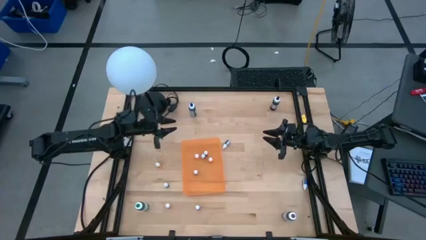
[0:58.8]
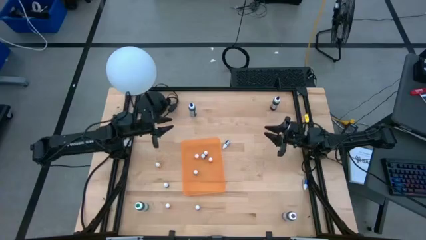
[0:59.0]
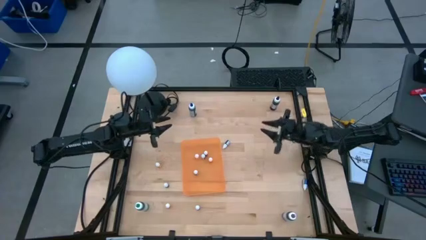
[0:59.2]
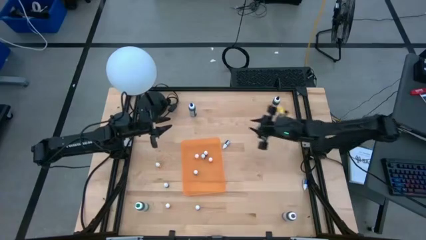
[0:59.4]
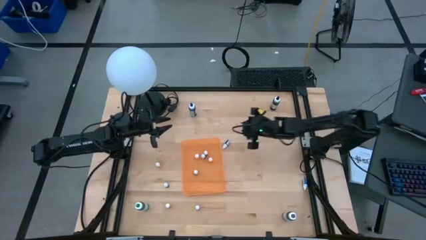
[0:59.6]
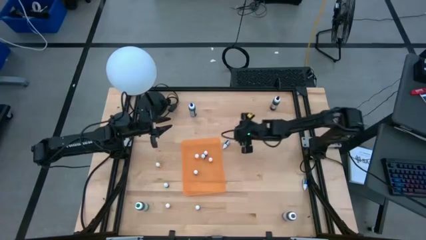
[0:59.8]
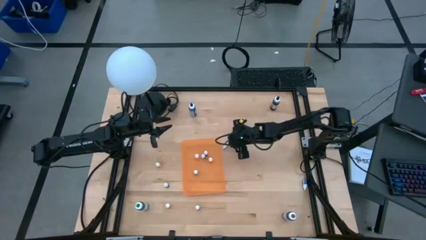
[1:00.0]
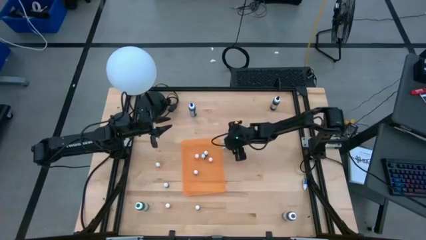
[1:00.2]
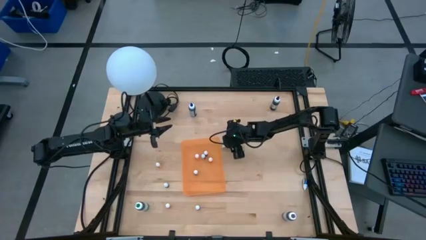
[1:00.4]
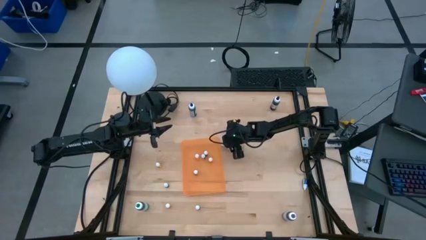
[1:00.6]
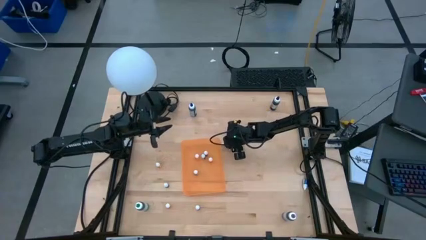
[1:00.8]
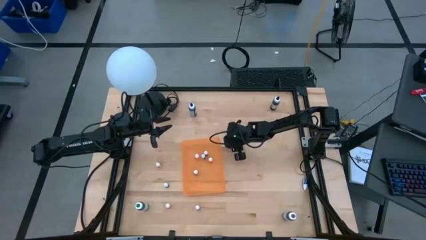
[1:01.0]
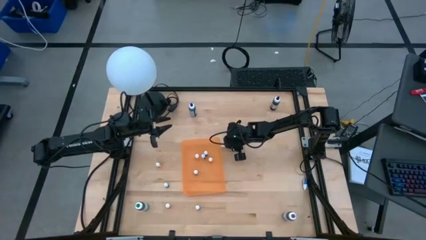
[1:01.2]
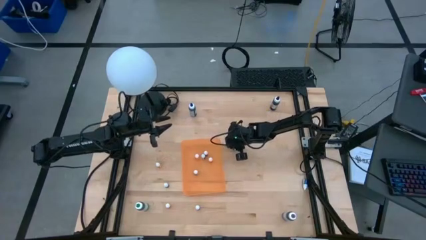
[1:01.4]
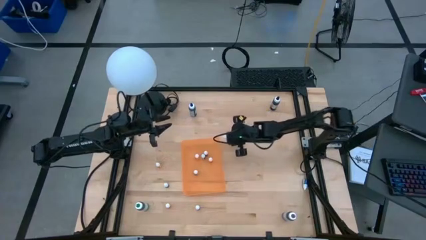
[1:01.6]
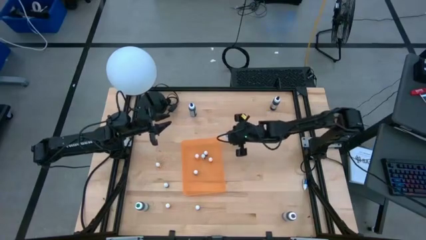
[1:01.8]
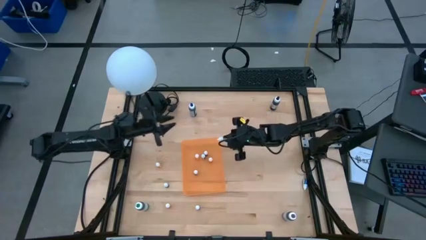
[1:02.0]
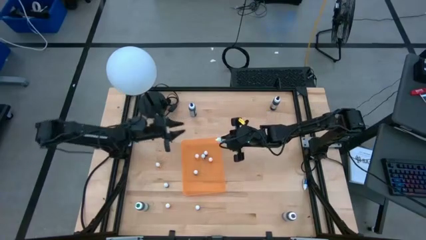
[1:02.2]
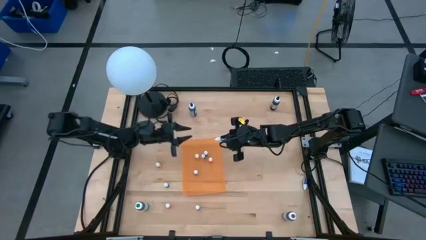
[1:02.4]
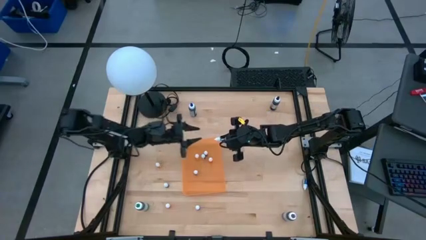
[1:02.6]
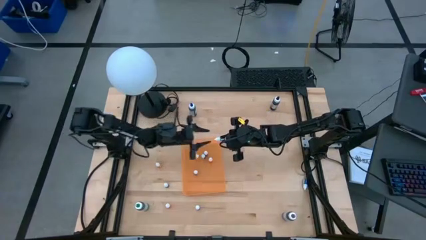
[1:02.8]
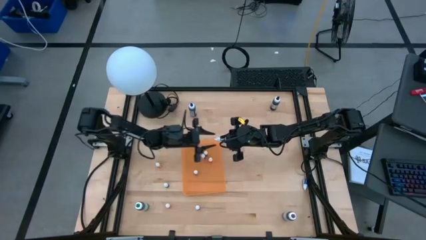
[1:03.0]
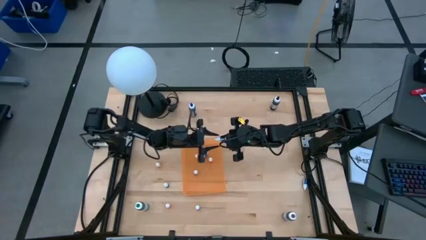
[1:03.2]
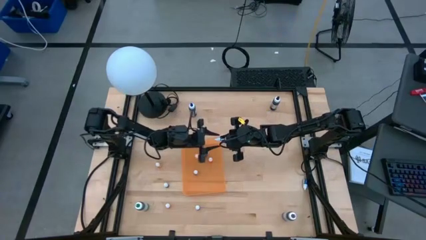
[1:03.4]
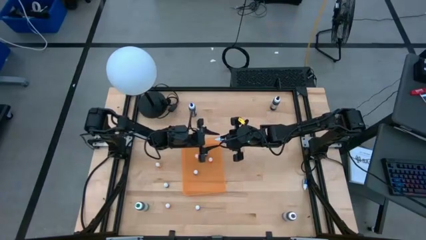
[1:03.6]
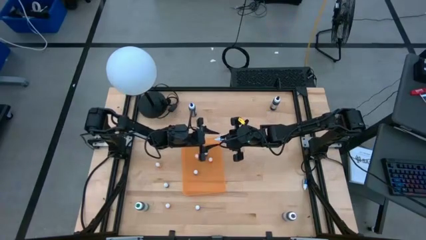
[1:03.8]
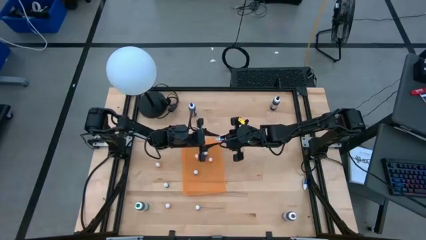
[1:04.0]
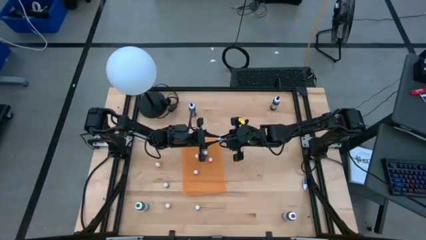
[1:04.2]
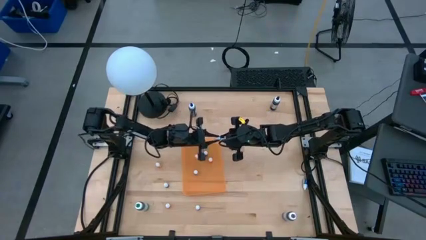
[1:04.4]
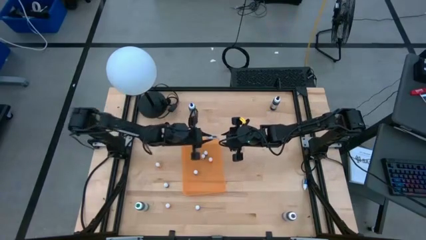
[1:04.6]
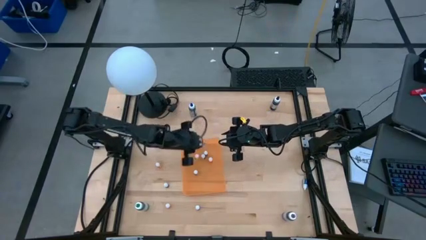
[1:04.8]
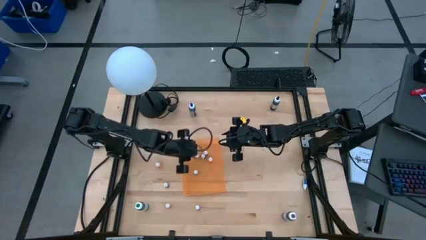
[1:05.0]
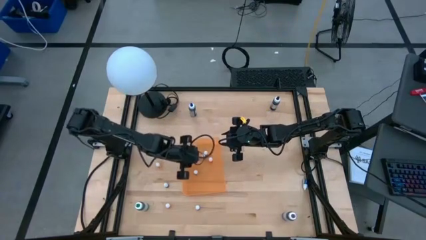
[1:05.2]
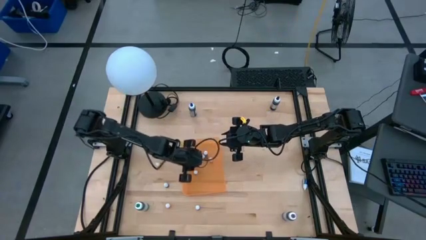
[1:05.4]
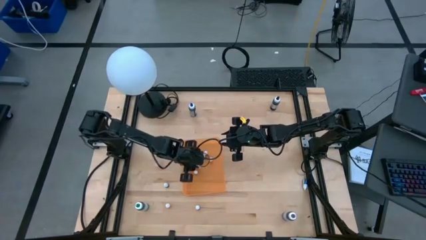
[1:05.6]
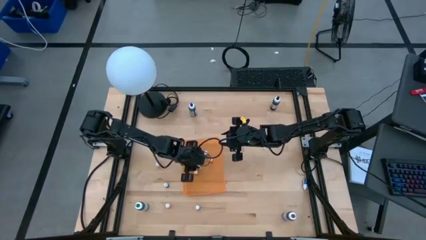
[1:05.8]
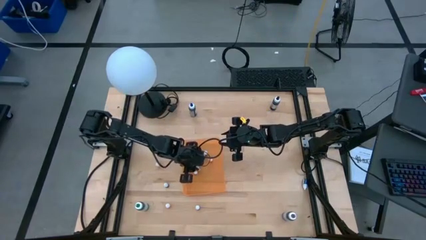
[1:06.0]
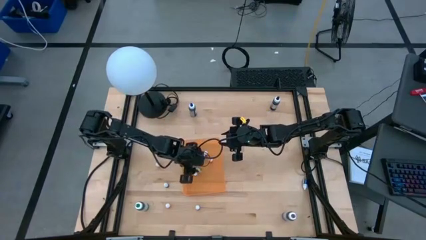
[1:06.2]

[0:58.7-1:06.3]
Task: Pick & Place food coloring
Put the small black food coloring bottle into the orange bin

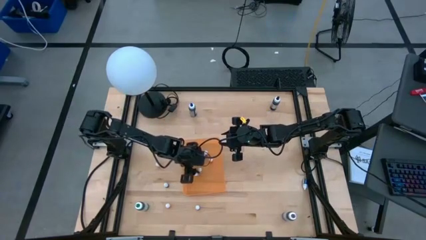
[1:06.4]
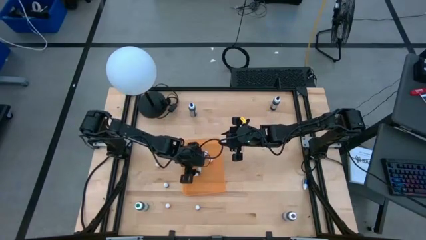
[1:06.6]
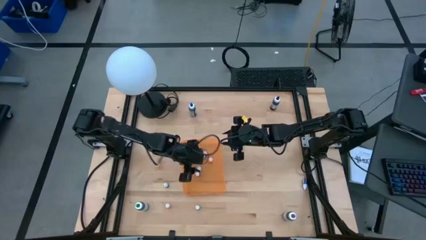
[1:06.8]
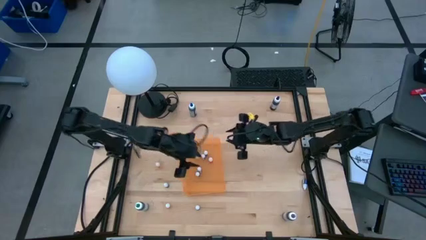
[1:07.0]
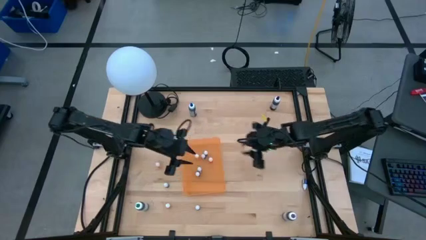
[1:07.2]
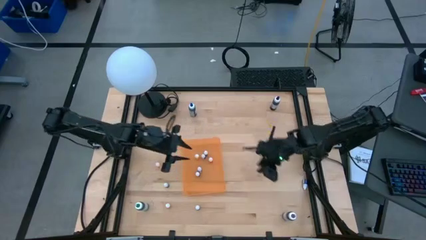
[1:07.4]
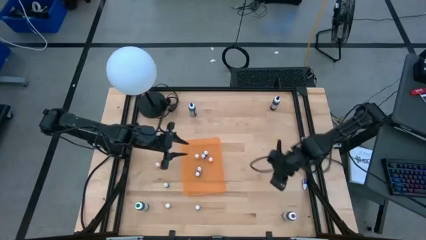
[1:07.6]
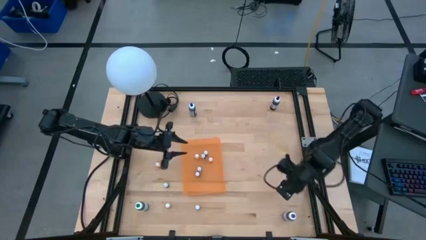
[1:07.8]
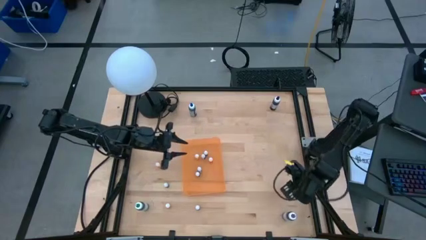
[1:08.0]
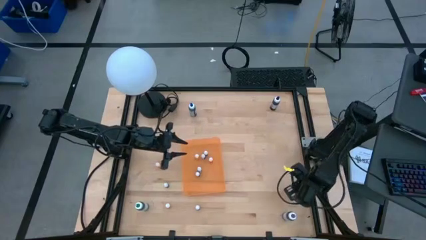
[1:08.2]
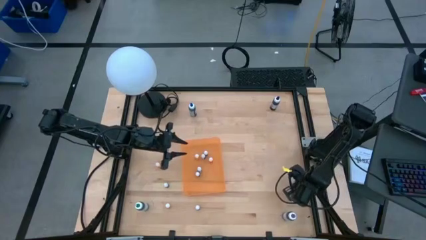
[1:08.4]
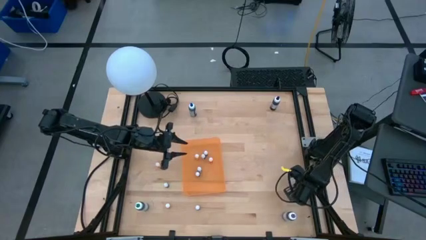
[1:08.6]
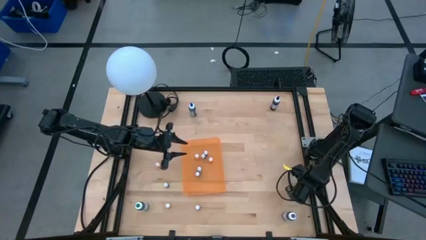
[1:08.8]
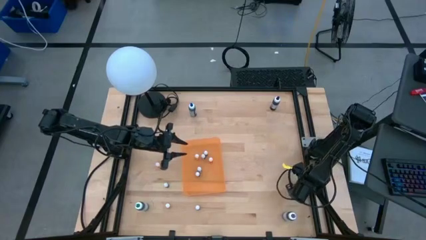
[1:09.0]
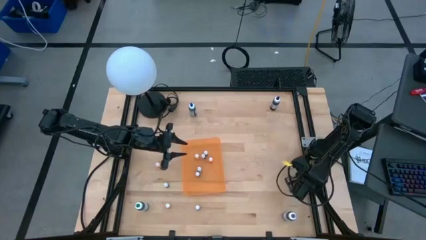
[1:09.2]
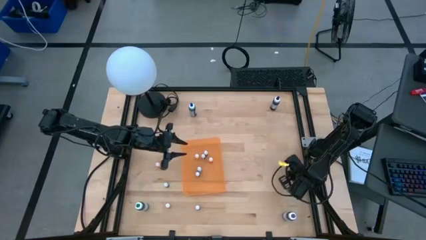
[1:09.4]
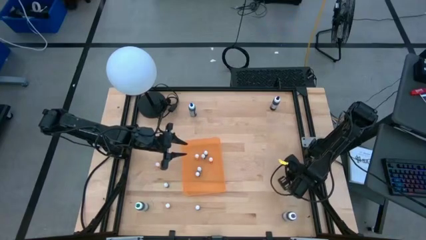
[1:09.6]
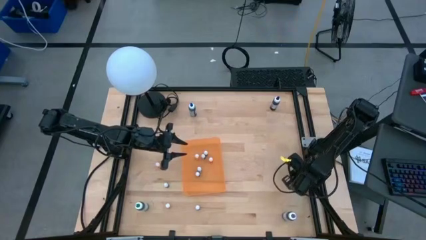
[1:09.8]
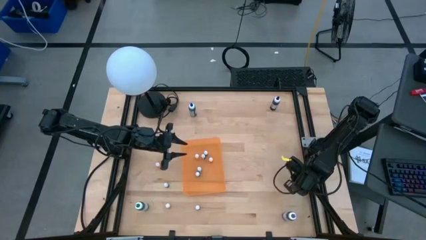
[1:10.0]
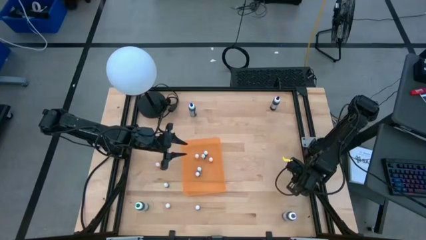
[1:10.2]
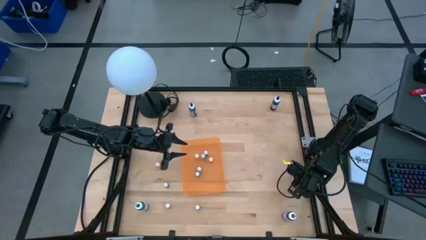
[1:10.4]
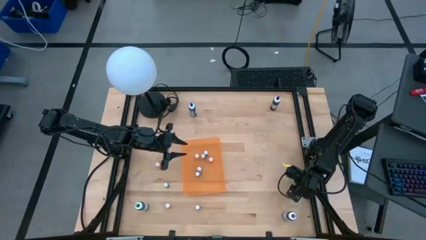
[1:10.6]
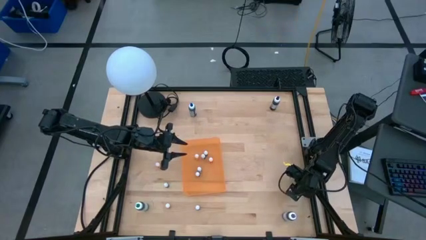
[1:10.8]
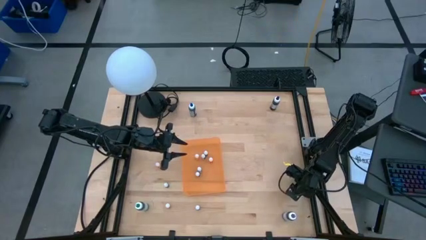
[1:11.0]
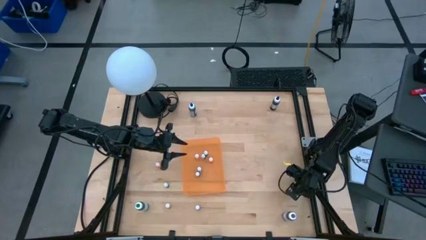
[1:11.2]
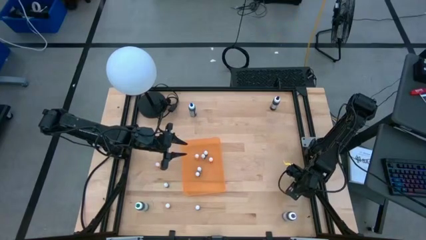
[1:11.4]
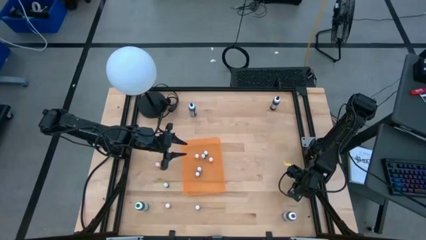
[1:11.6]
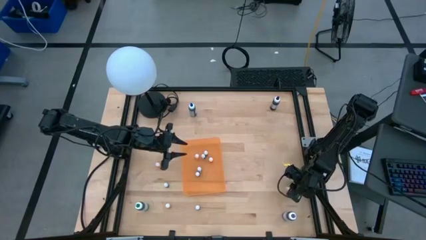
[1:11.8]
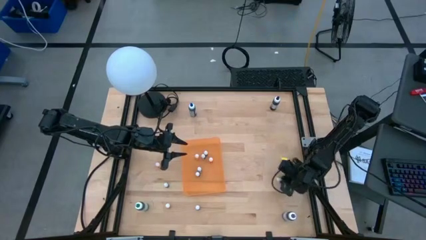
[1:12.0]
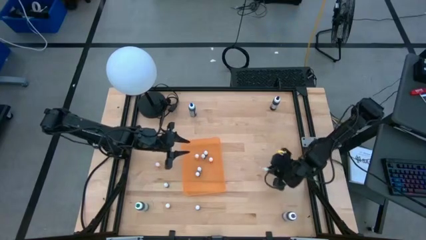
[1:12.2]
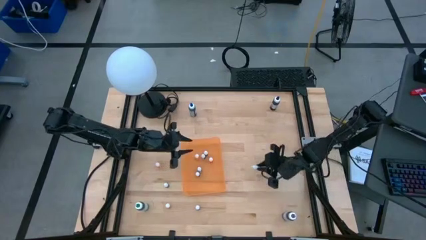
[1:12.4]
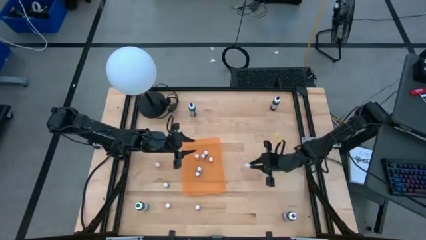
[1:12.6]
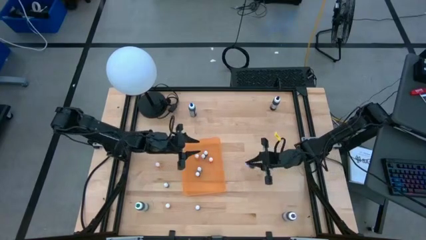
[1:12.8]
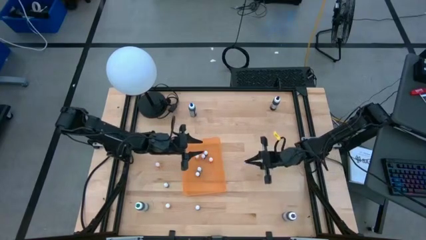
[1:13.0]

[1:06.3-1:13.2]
Put the small dark blue food coloring bottle into the orange bin

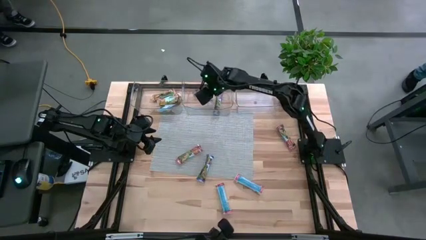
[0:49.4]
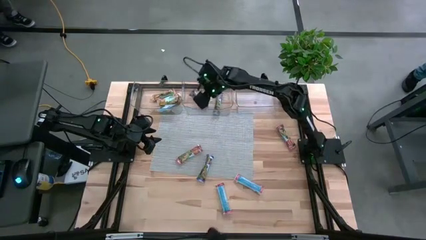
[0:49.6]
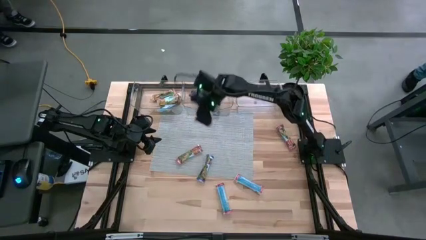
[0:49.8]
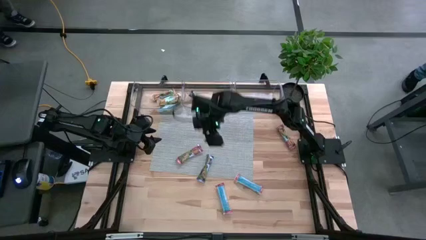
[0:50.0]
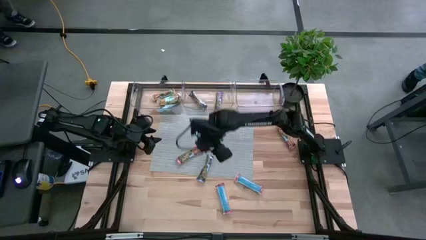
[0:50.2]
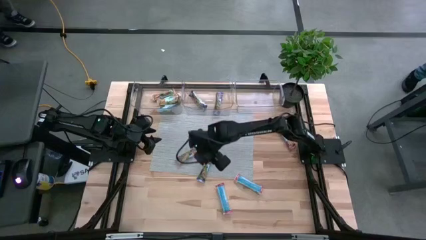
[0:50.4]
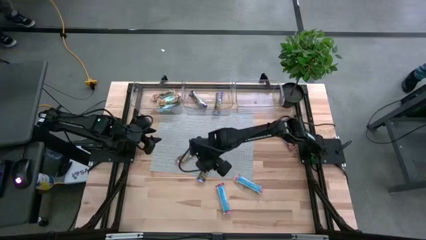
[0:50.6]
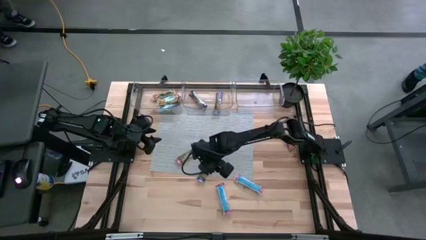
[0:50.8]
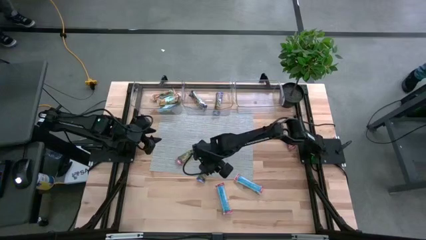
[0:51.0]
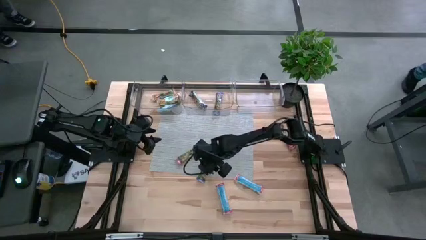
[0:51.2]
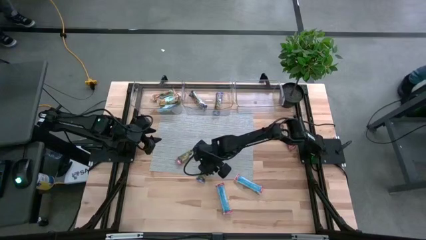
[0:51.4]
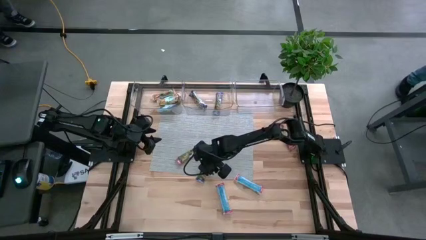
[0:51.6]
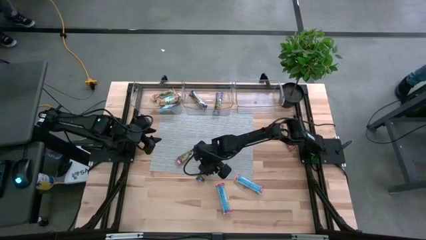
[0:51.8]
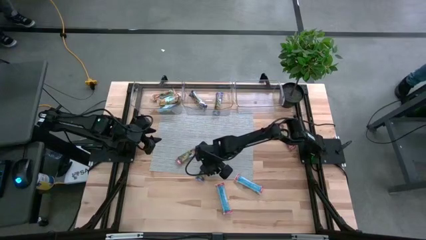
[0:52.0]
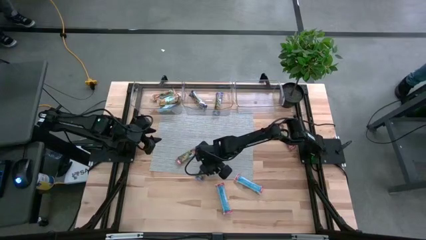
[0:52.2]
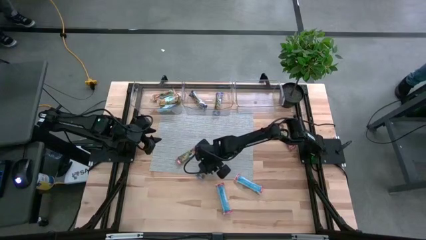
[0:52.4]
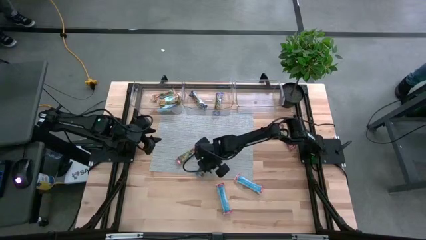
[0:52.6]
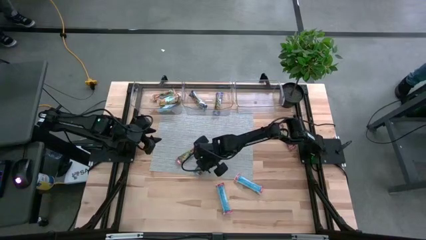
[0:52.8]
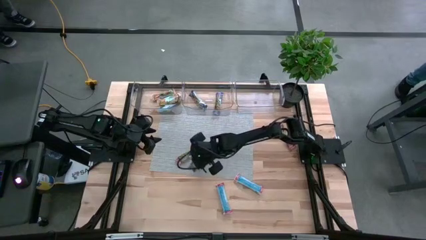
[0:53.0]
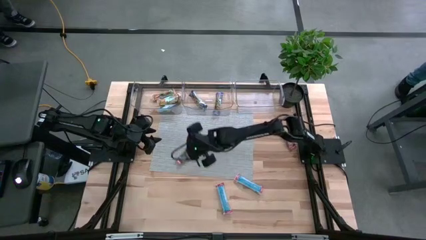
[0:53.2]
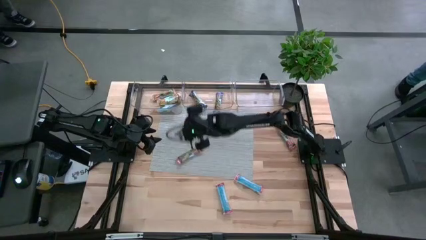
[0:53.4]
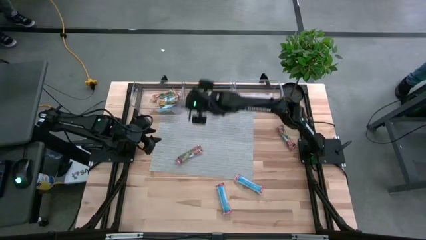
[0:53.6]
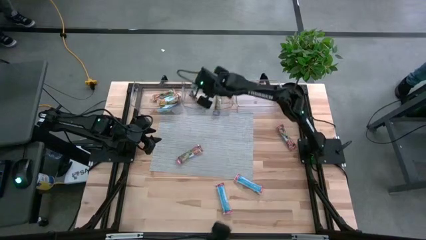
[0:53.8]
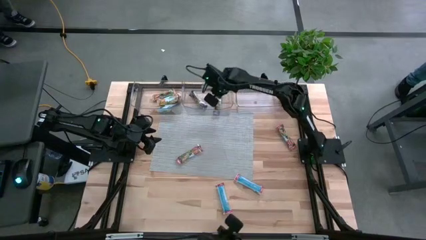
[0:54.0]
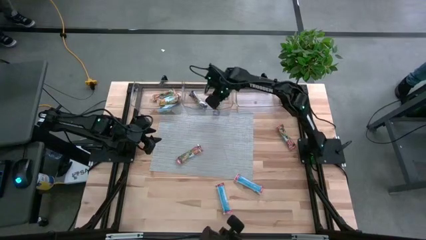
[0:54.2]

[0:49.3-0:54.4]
Task: Pick and place Granola Bars by type
Put the blue granola bar into the middle transparent bin
